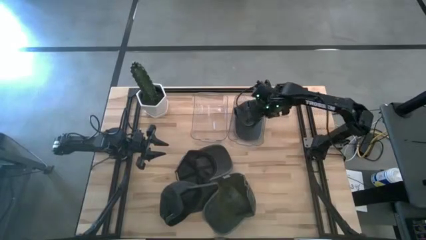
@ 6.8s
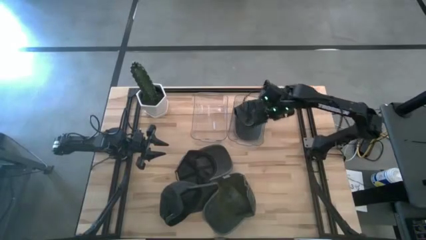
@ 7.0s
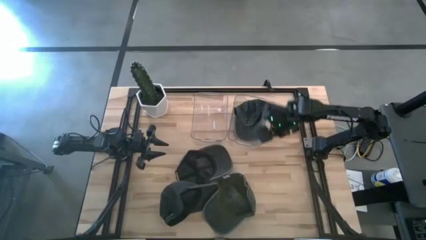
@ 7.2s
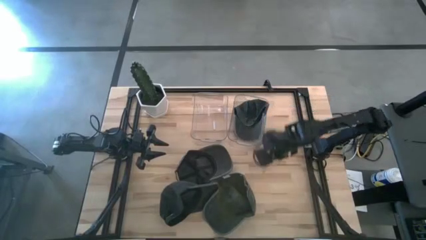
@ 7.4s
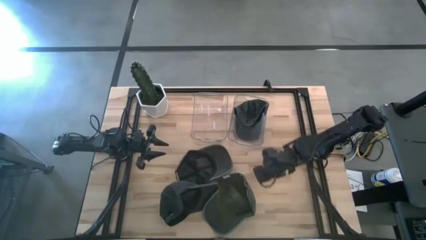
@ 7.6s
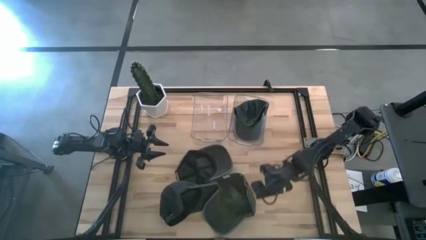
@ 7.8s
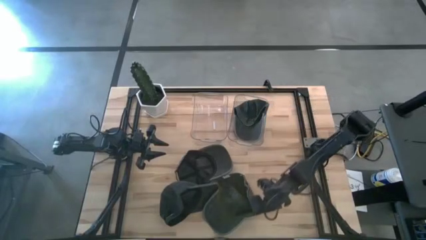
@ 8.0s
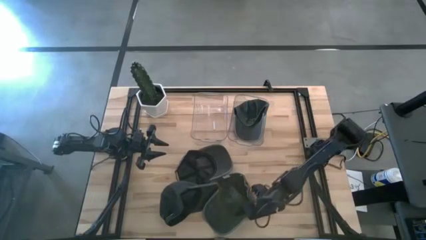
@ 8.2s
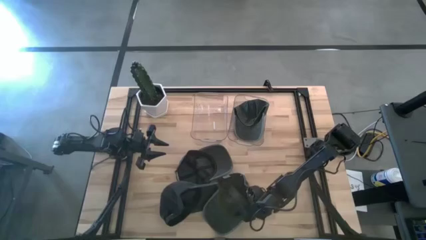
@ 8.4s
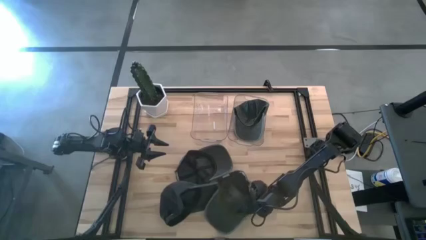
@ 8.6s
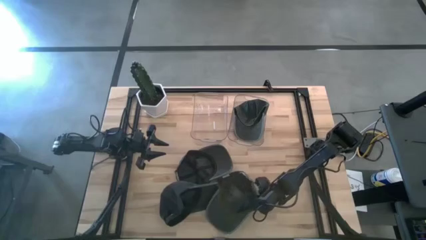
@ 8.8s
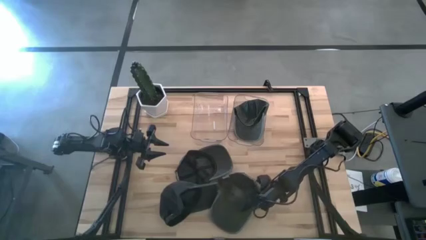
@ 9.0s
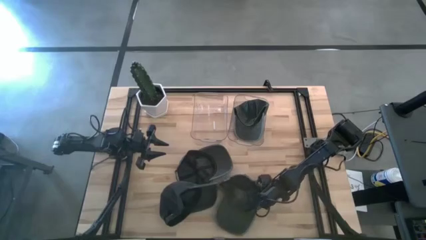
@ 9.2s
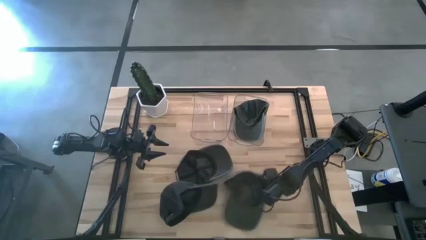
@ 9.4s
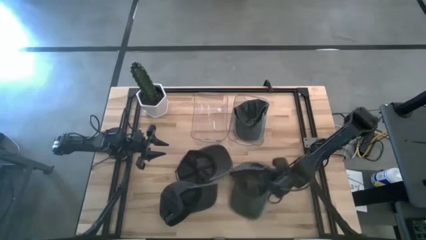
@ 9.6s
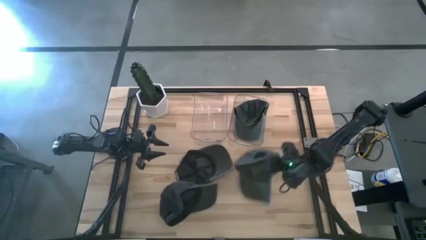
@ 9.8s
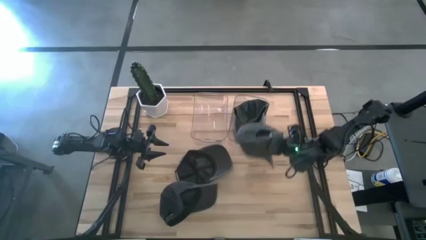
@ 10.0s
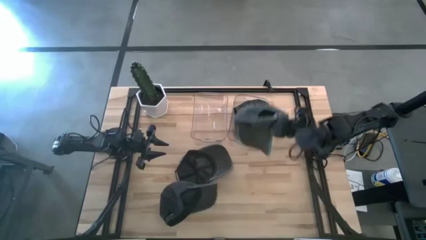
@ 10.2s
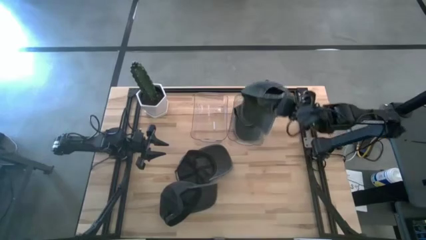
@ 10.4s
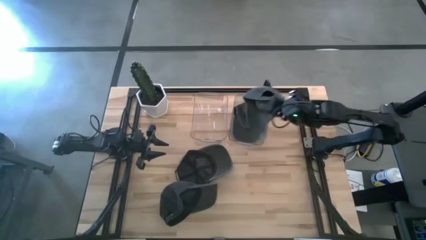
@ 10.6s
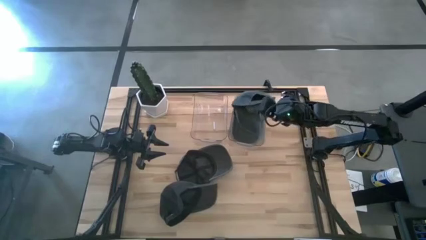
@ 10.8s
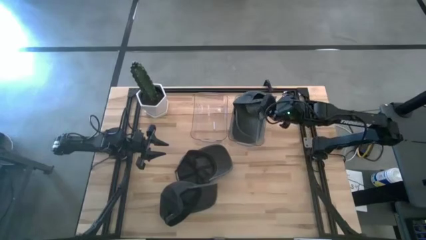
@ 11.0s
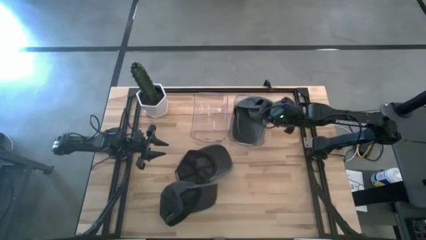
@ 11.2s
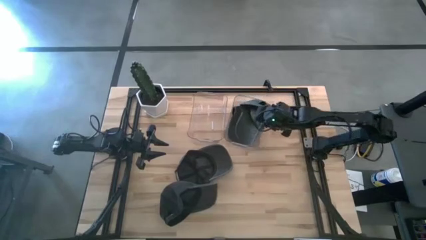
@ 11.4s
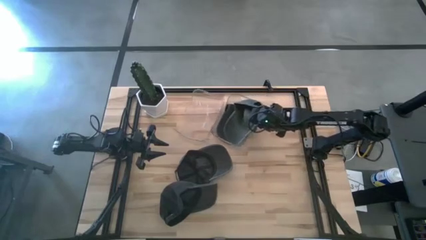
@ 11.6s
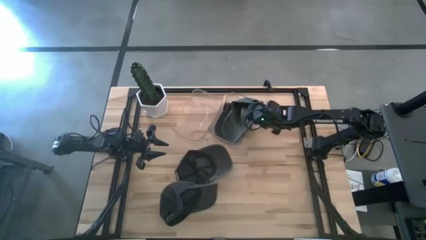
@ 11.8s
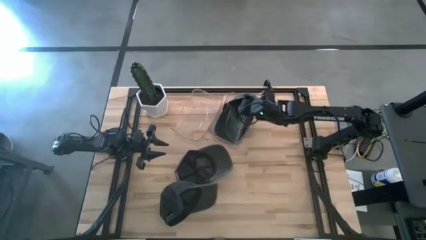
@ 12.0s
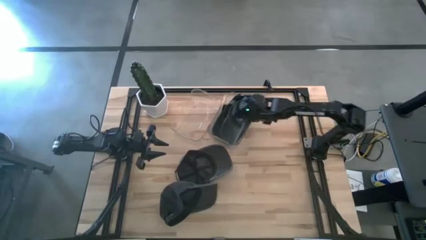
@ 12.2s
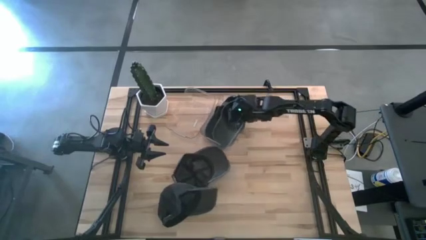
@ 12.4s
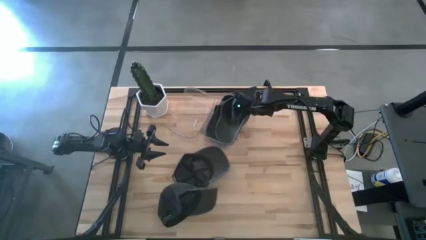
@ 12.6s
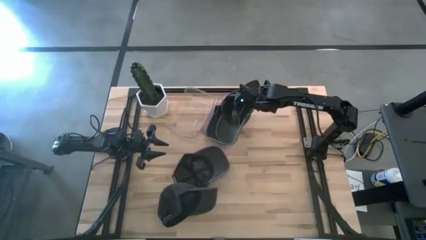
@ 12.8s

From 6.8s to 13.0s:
Task: Pick & Place hat
Put the dark green cap into the right transparent bin

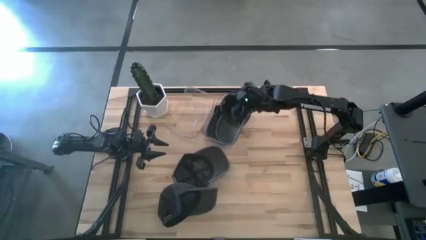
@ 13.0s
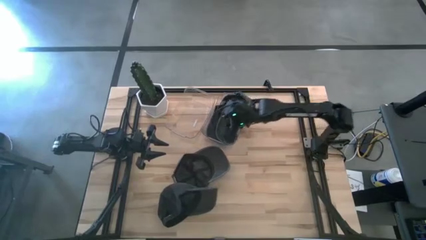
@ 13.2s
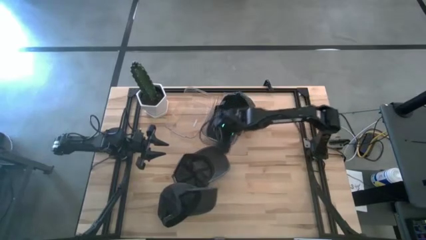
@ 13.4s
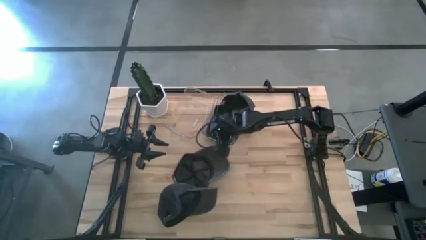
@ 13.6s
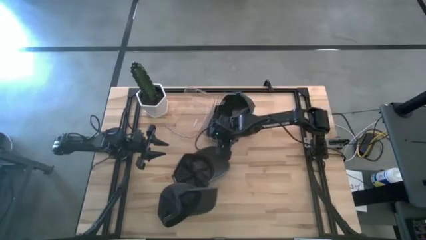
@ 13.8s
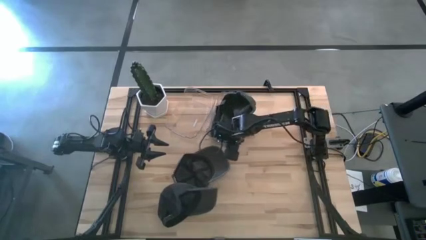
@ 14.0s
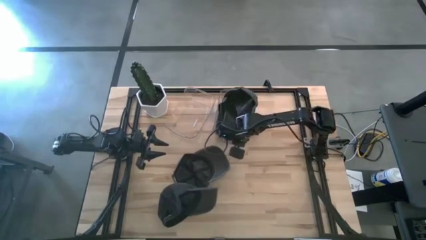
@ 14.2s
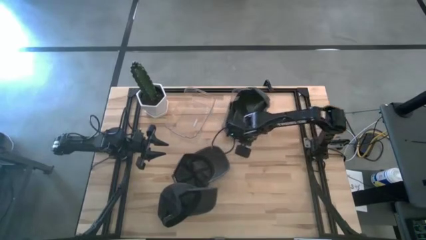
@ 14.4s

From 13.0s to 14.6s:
Adjust the right transparent bin

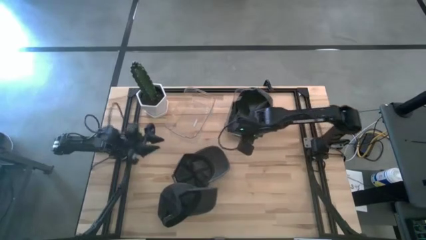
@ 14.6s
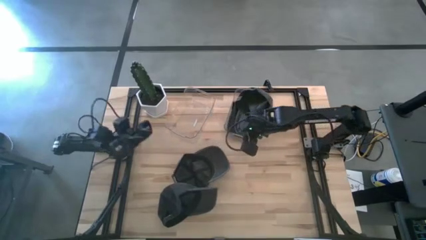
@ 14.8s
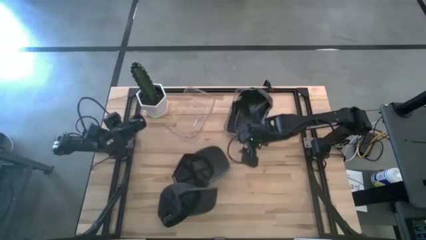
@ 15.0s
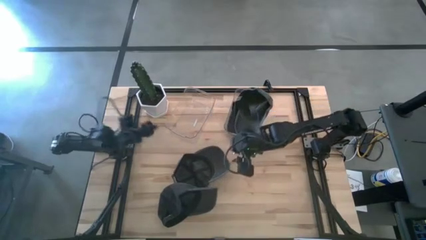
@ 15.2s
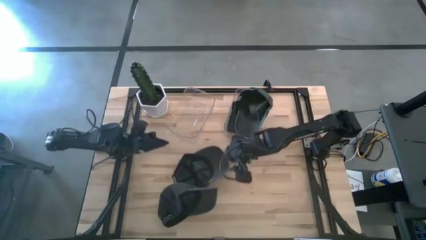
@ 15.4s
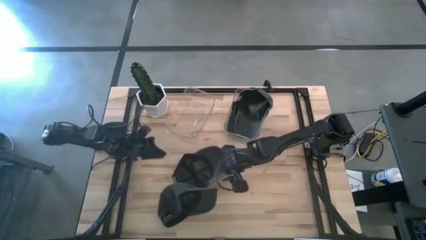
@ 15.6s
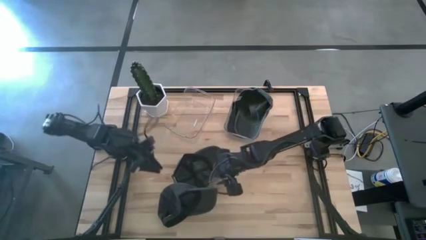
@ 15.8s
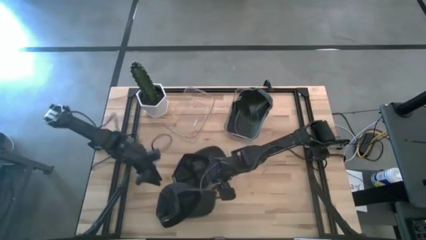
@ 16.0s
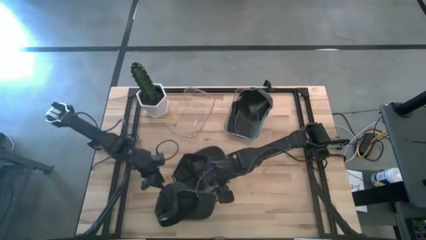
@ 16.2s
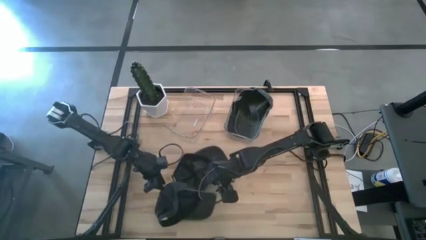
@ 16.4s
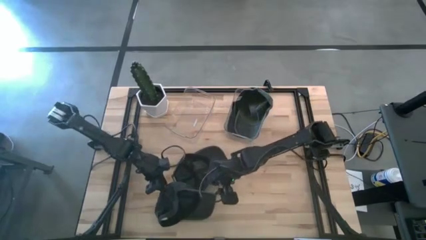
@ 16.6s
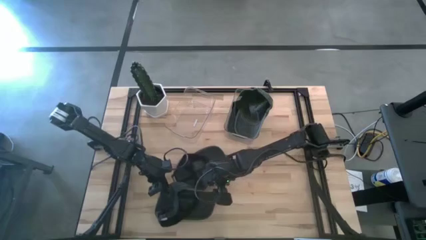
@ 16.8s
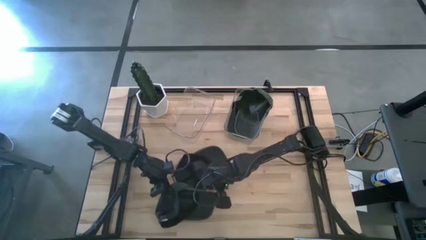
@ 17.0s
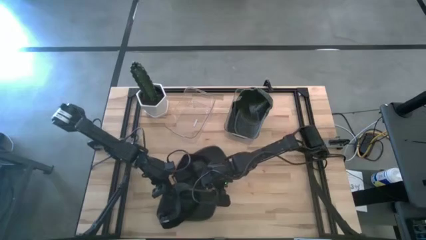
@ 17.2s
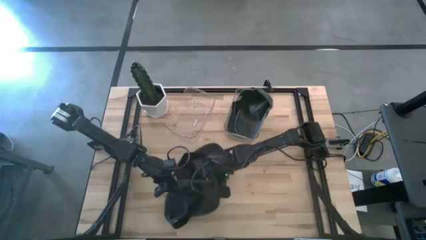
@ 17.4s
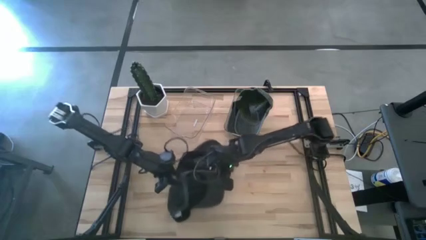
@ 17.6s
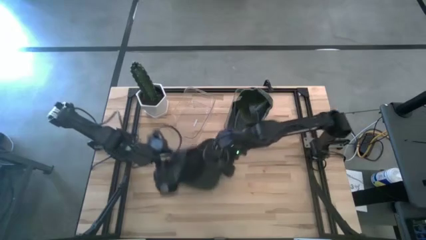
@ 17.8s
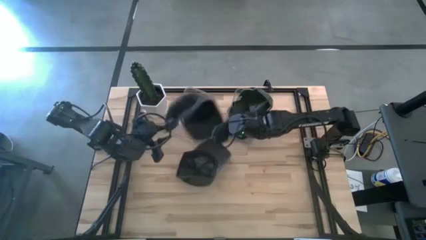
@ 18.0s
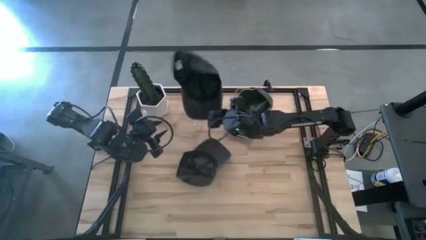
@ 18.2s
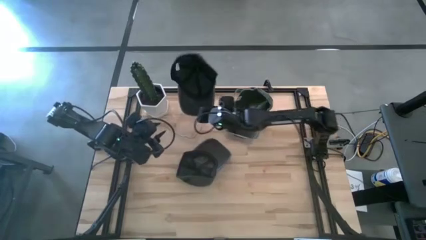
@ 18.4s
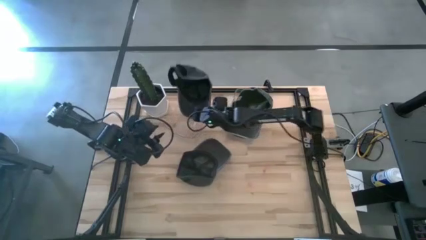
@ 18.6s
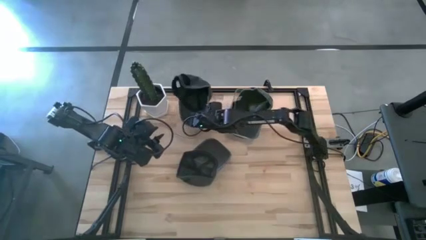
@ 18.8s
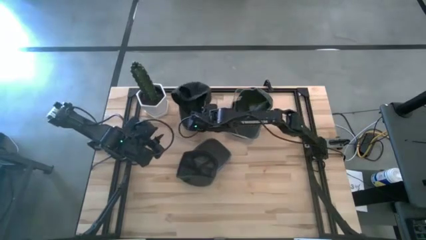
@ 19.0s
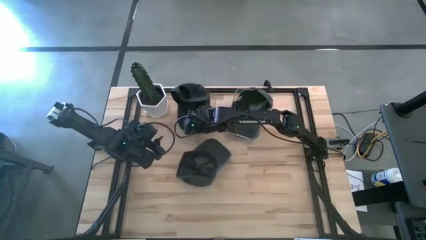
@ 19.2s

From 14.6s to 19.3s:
Put the bottom black cap into the left transparent bin

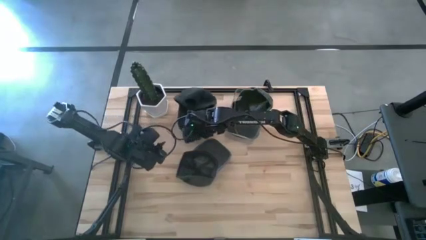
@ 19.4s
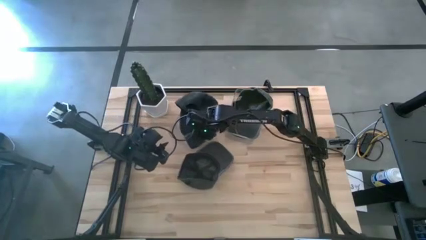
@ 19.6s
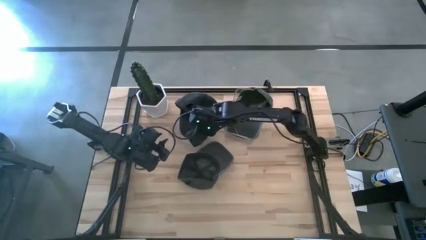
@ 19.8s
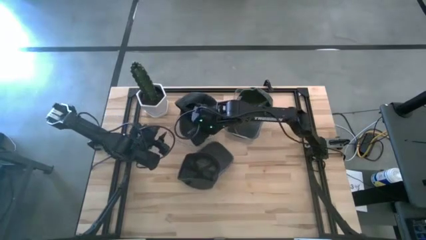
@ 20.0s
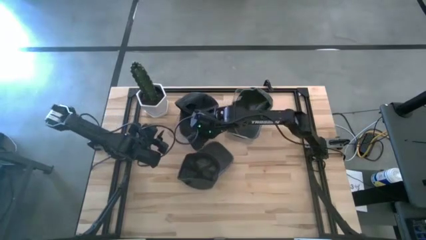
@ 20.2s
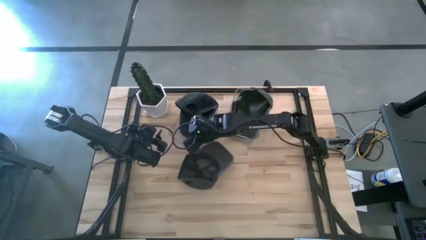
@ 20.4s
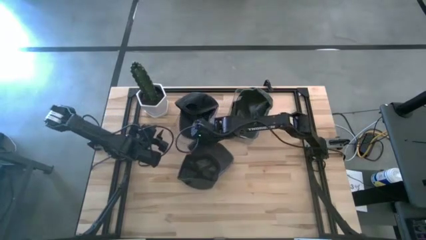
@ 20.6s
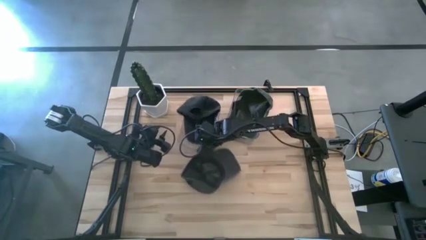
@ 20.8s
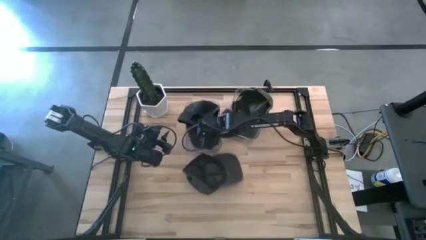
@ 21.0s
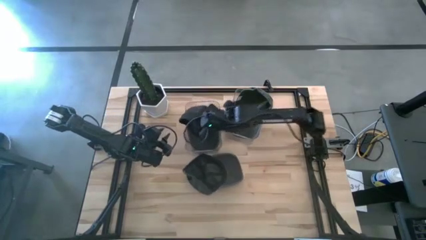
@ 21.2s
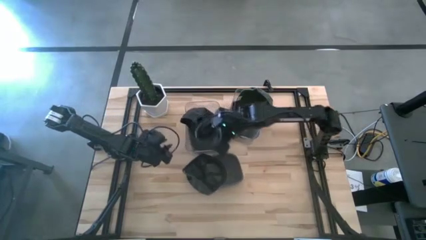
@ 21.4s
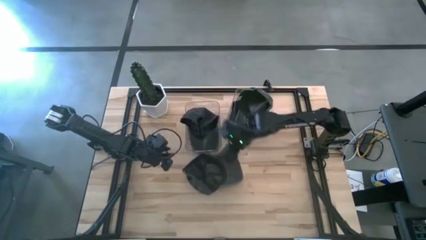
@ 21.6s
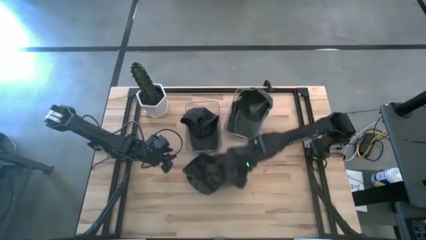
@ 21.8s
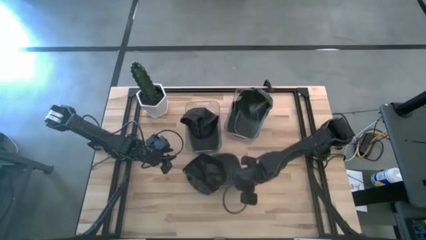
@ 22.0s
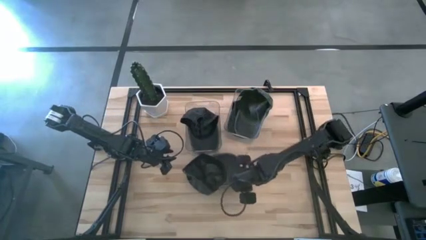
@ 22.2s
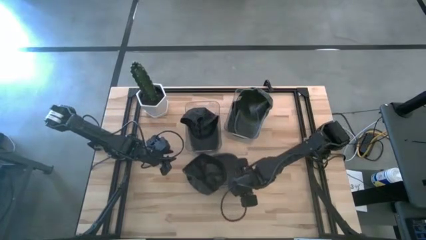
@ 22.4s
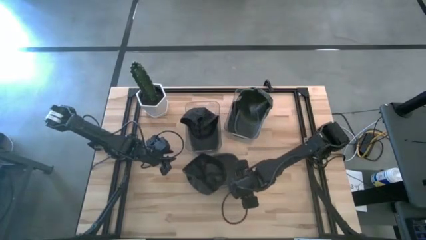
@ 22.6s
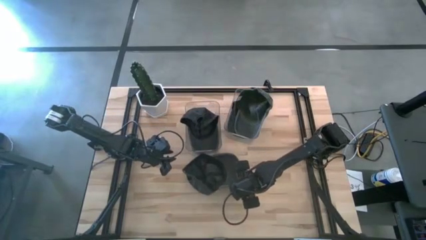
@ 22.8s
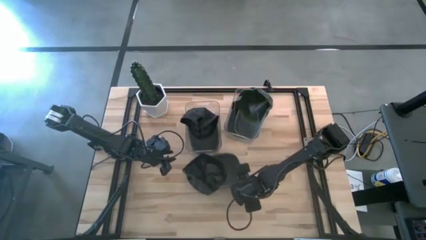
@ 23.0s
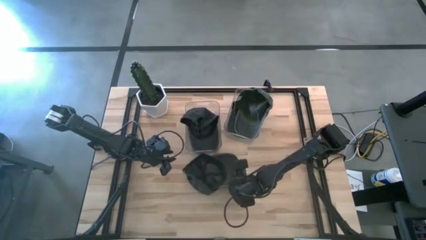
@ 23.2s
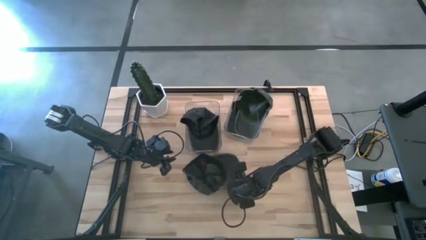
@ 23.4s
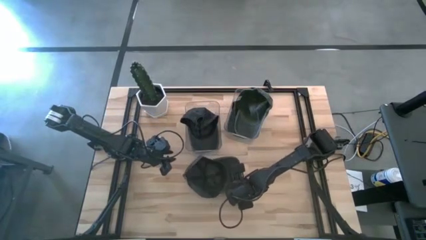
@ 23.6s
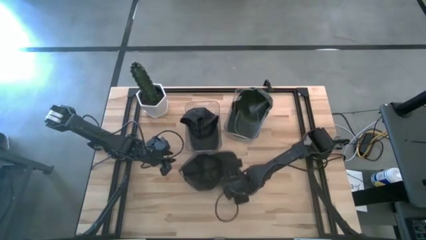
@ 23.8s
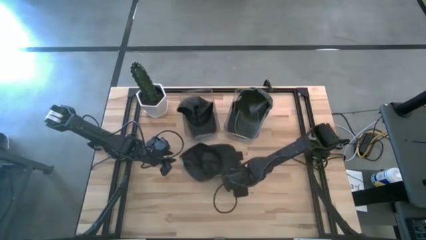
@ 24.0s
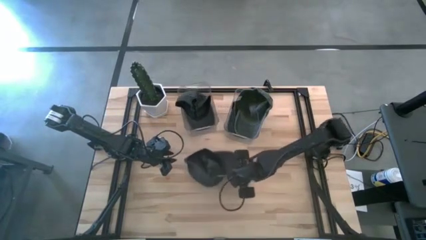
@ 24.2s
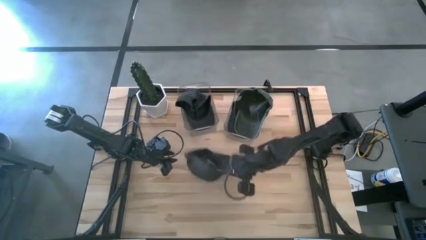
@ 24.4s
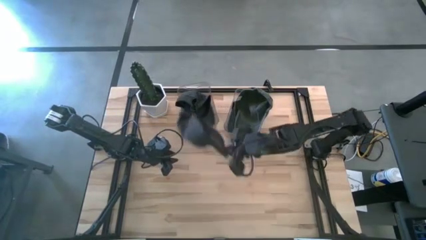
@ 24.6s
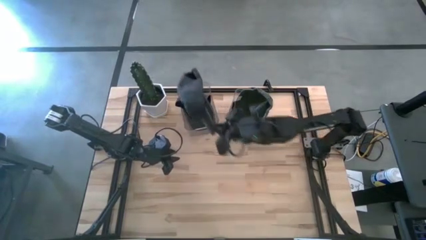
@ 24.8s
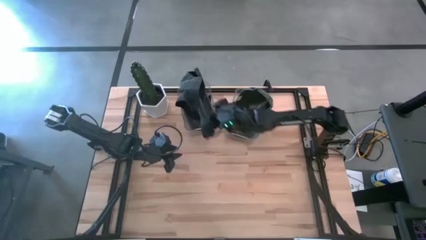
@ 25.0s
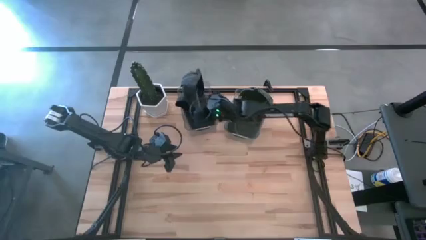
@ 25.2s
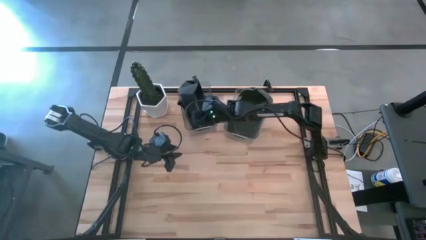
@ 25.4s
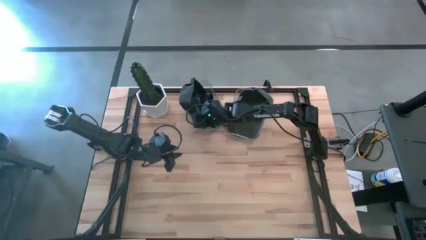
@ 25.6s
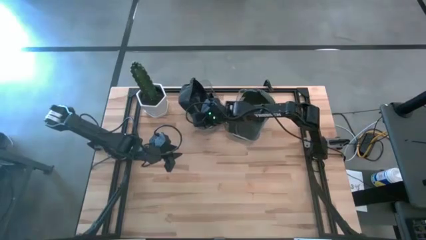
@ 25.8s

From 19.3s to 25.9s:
Put the black cap into the left transparent bin
